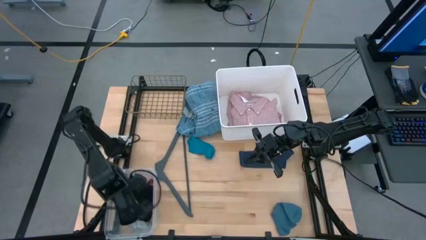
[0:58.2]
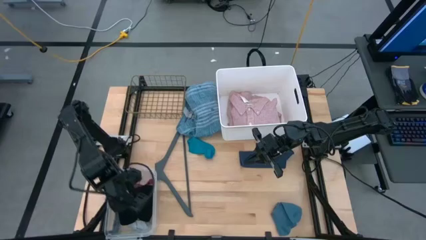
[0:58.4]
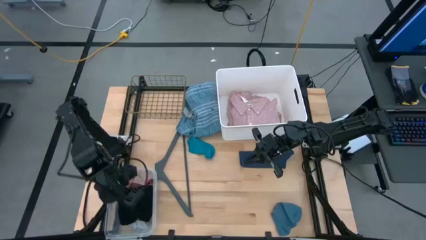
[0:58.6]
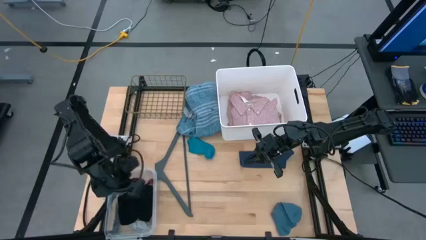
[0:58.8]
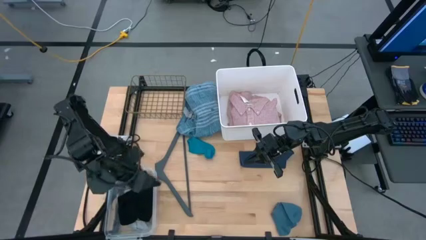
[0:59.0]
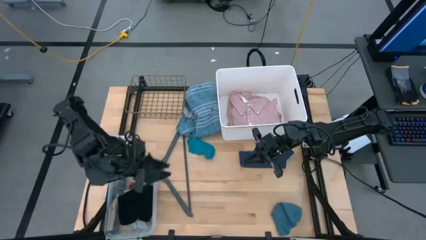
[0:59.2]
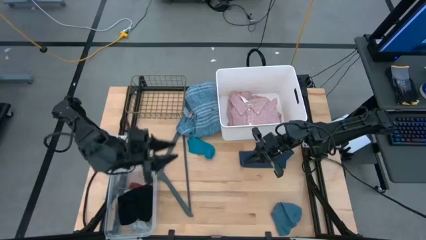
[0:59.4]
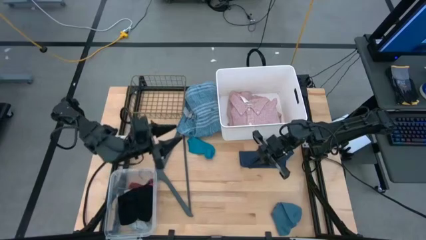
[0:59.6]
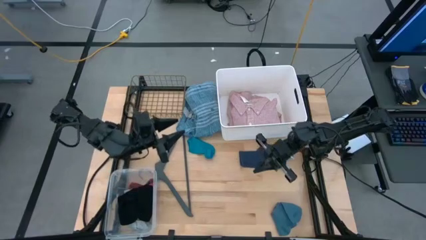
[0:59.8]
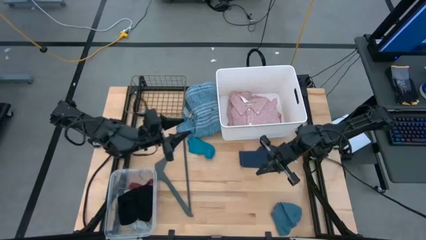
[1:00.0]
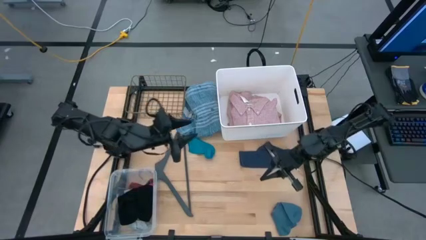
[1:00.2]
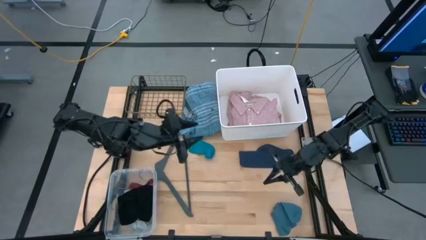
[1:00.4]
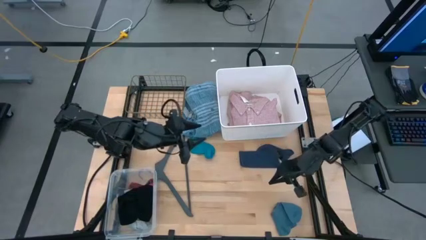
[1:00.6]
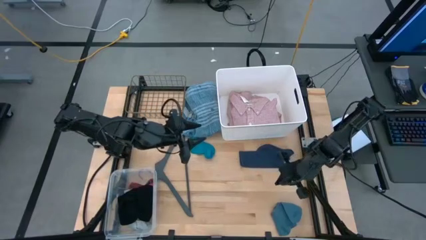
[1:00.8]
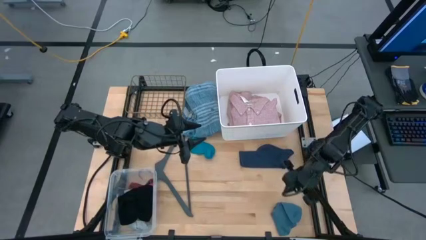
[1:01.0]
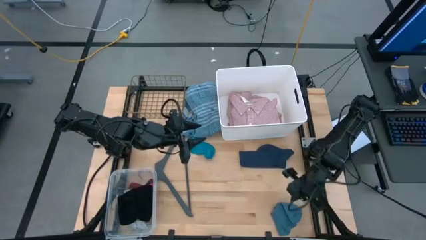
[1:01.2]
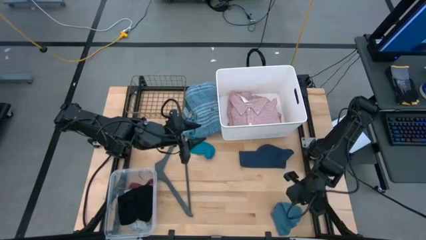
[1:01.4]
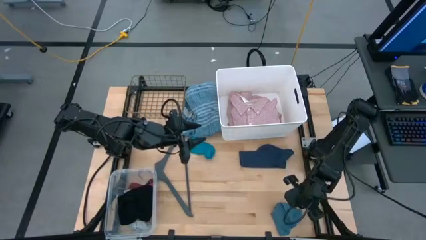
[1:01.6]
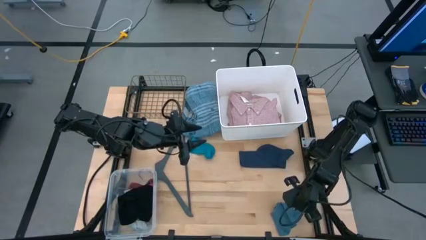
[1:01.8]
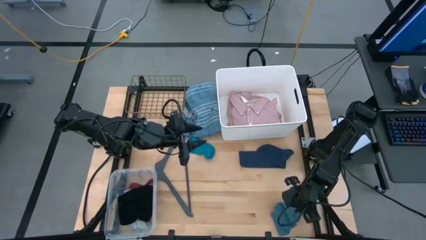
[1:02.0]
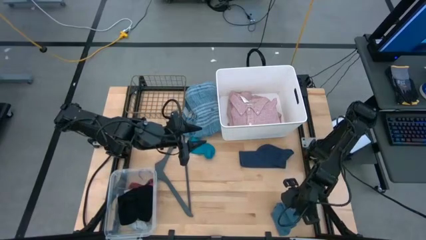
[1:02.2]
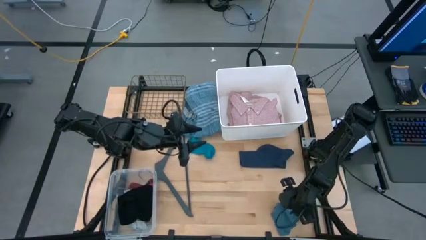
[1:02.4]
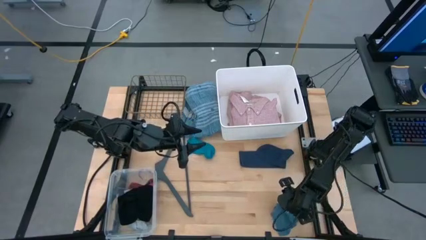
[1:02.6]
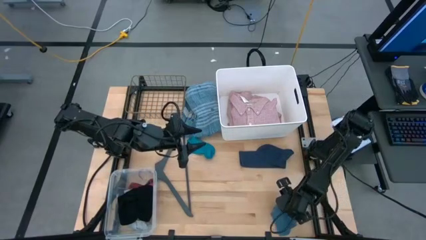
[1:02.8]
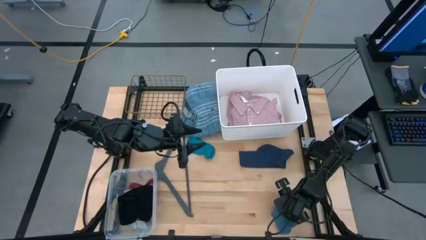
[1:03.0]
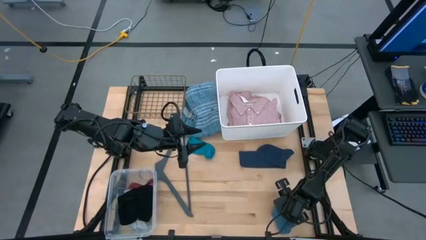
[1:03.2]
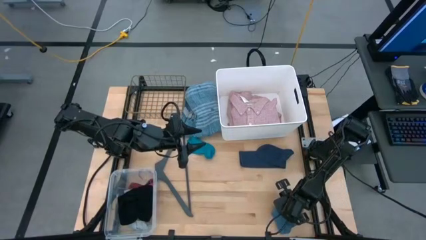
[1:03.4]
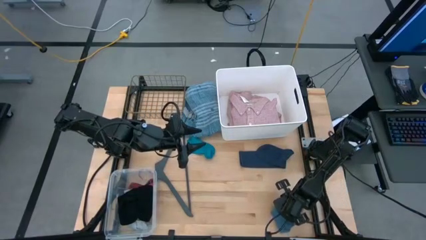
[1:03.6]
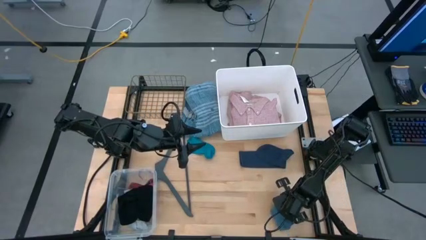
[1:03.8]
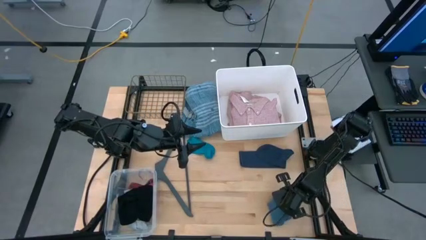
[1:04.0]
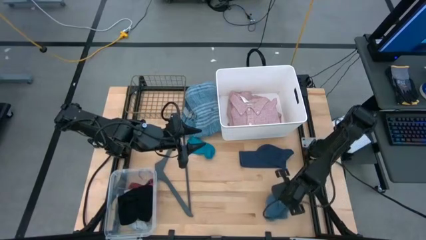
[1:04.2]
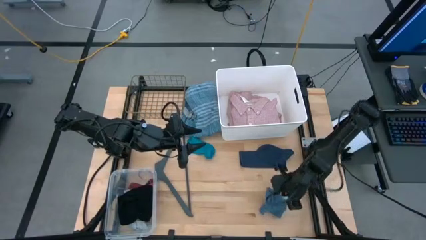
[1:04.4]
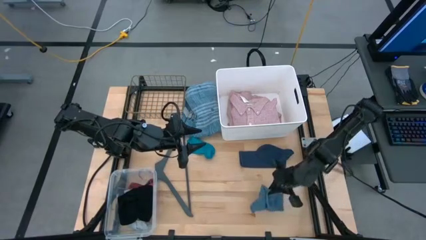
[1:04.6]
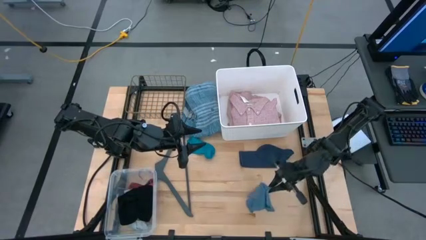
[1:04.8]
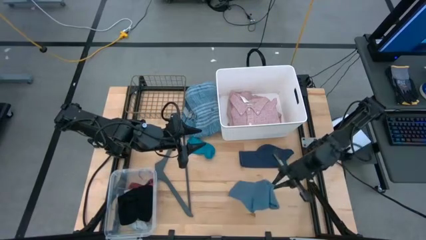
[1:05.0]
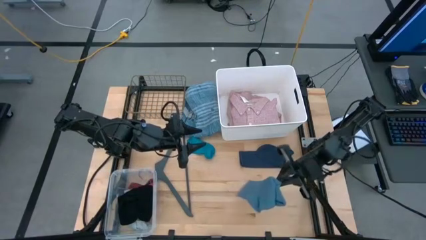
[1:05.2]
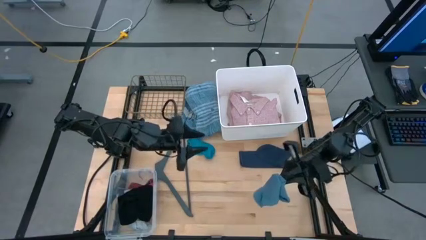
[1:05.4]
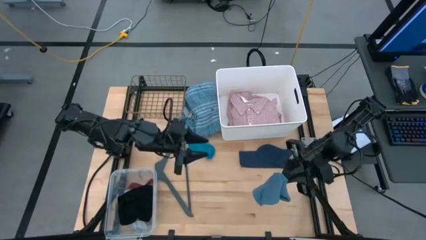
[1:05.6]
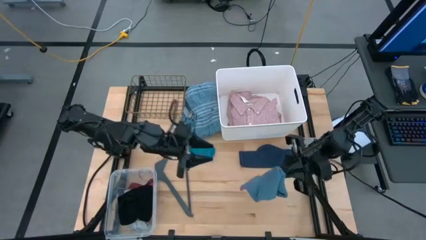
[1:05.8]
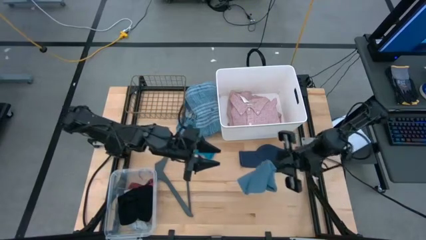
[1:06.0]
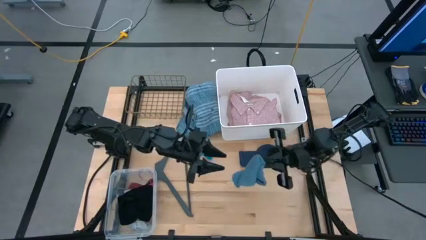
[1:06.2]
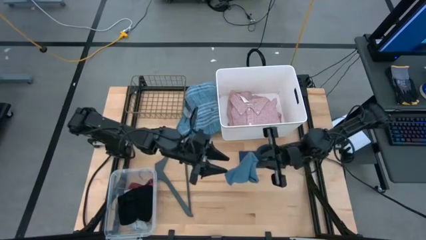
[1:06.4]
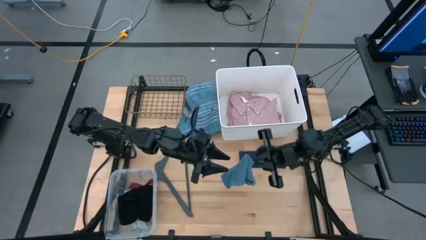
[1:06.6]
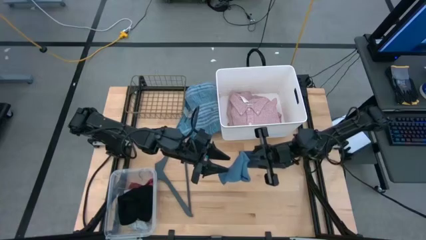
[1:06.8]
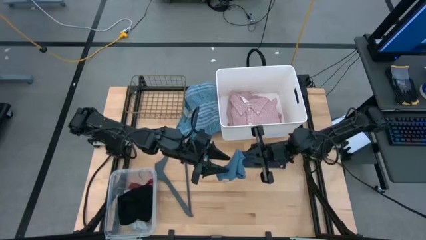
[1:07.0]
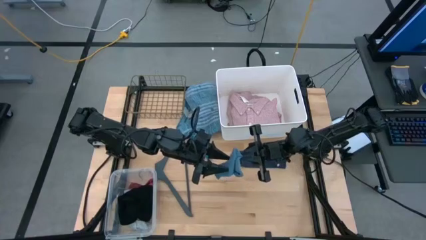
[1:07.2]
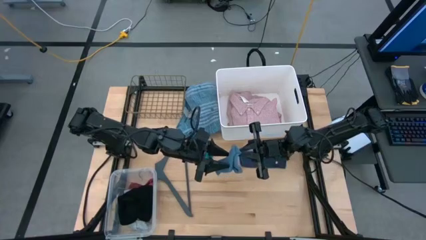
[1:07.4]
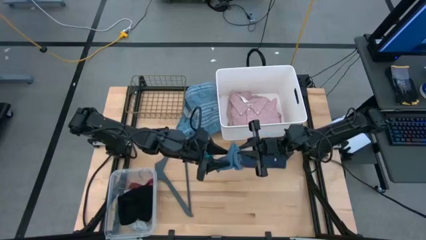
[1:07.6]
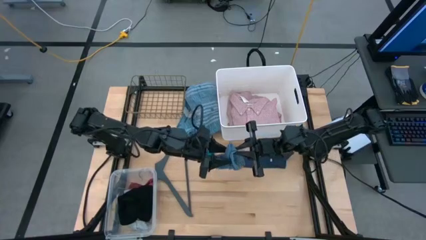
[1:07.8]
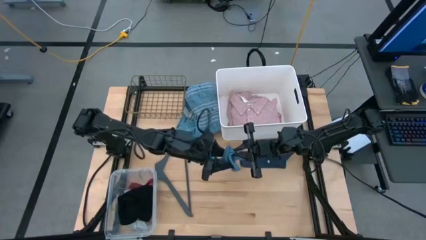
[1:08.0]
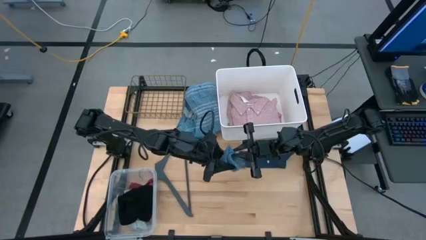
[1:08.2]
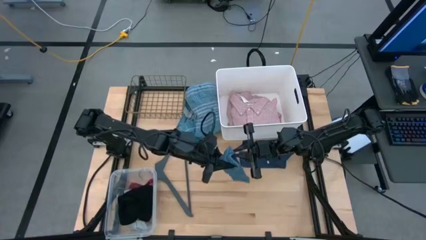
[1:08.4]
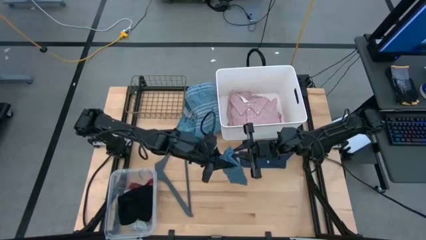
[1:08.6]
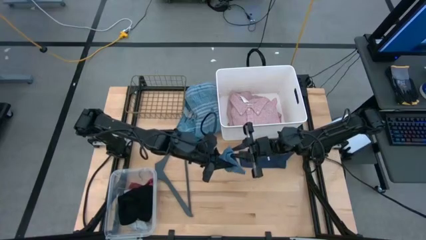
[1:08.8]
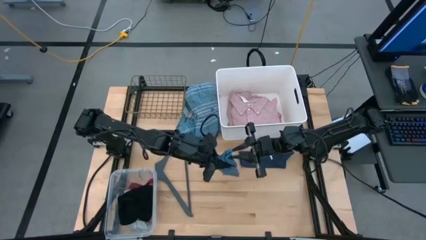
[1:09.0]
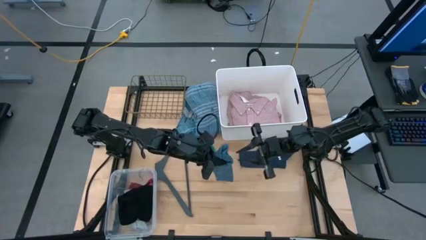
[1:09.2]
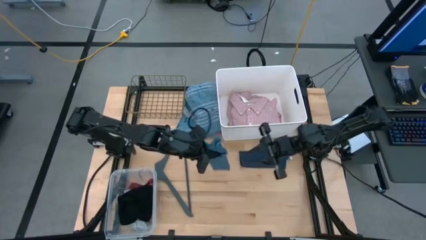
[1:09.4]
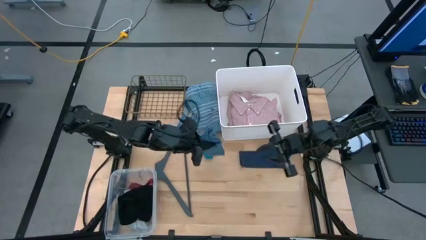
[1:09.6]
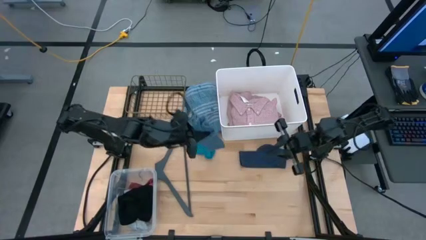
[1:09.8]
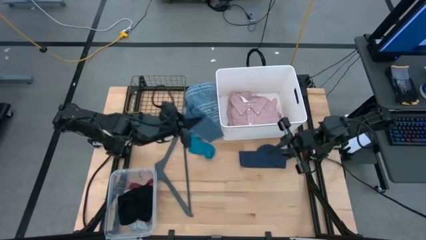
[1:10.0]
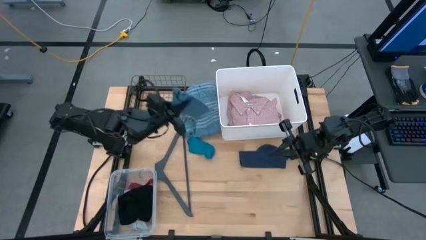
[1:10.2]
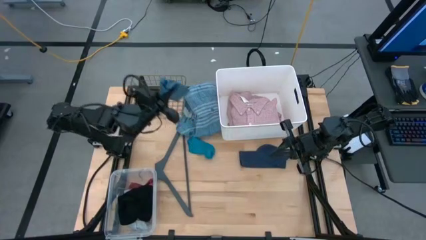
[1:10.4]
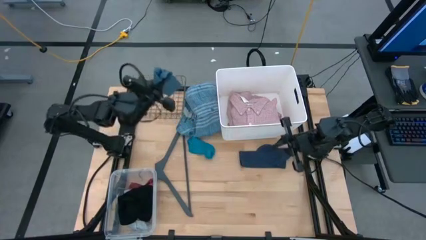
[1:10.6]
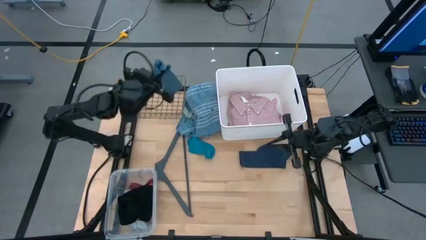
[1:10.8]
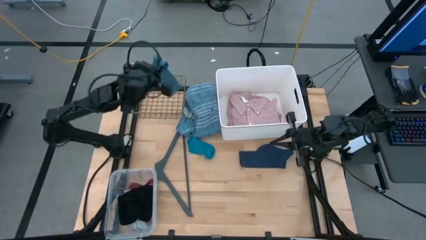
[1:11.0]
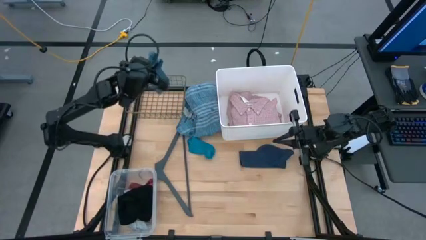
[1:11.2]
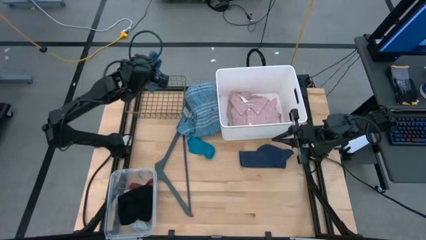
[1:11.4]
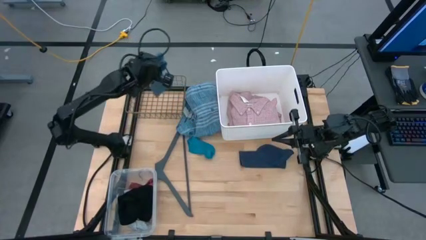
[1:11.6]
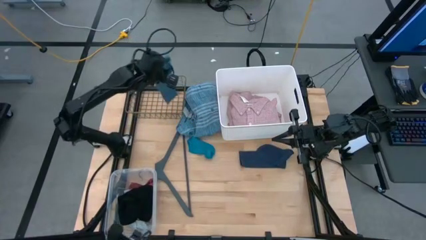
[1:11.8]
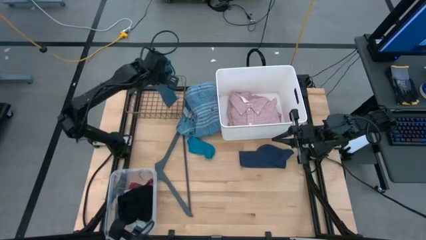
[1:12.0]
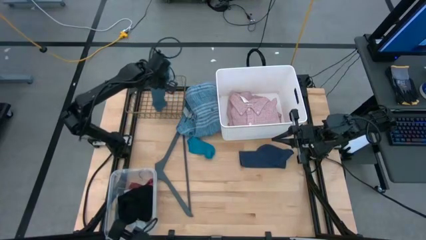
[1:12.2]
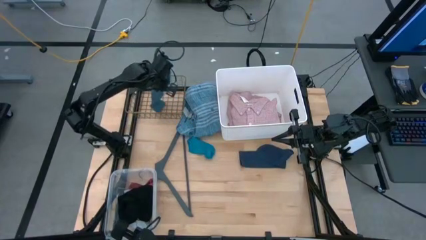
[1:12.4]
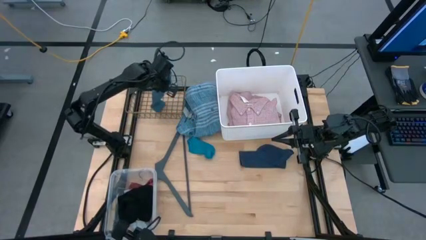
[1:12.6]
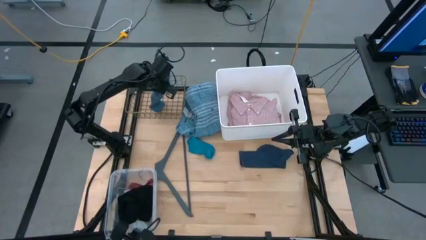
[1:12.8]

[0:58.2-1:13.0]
Task: Pick & Place Cloths
Put the bottom light blue sock into the gold wire basket

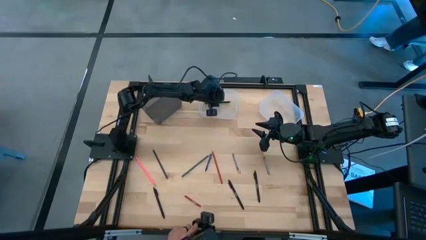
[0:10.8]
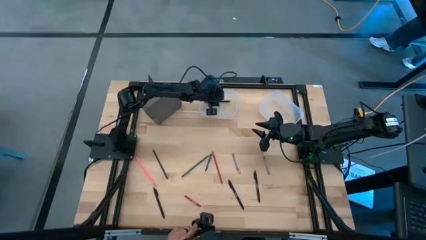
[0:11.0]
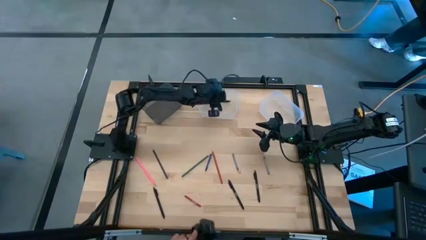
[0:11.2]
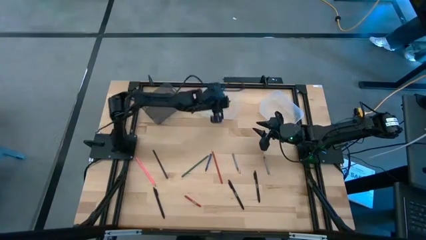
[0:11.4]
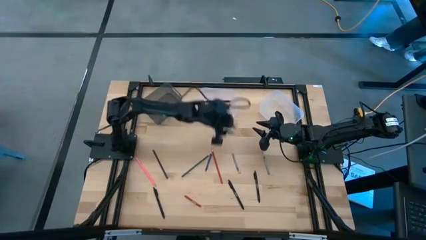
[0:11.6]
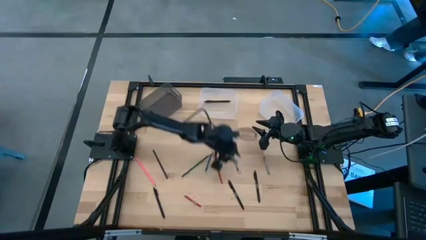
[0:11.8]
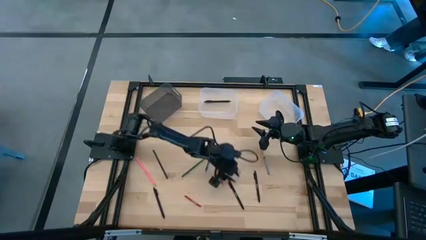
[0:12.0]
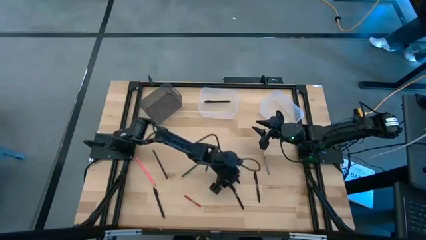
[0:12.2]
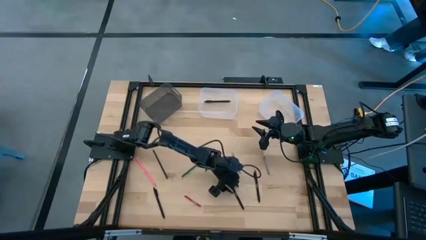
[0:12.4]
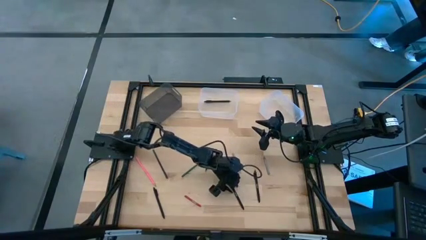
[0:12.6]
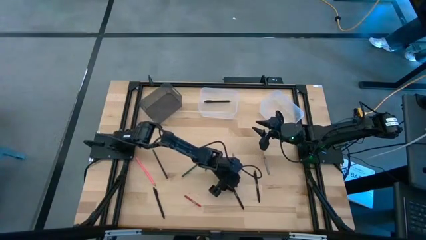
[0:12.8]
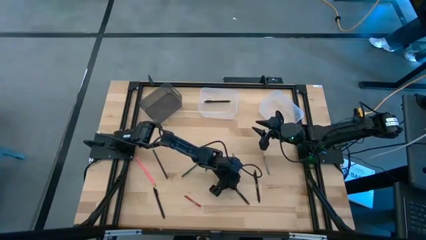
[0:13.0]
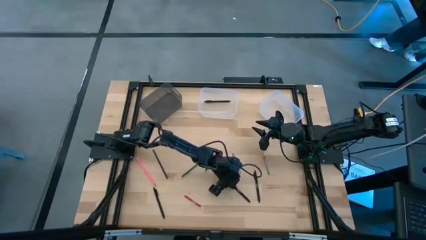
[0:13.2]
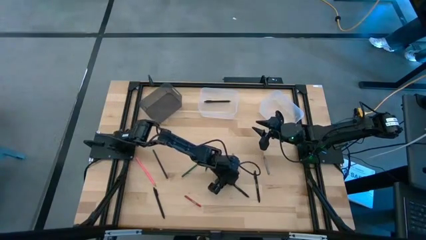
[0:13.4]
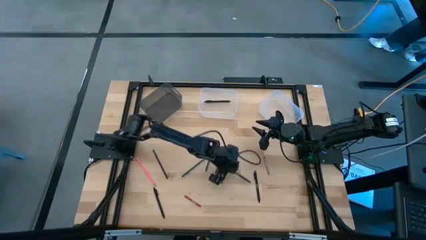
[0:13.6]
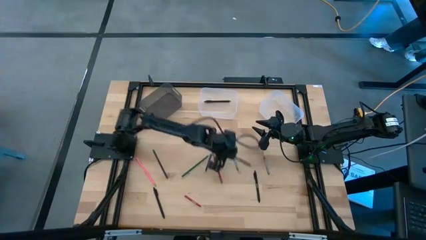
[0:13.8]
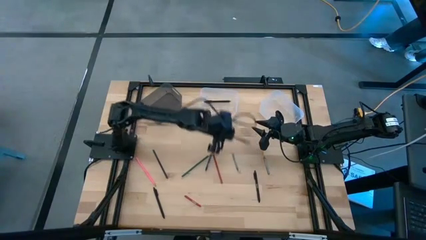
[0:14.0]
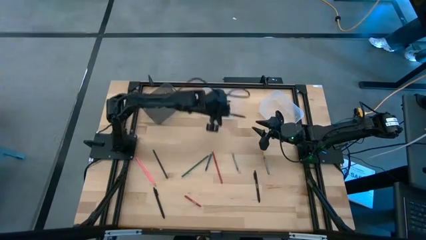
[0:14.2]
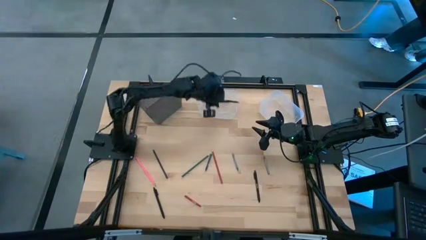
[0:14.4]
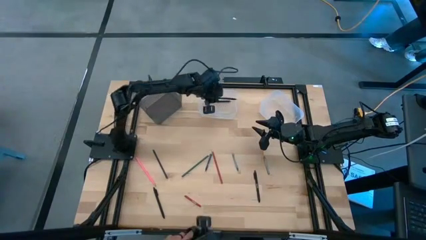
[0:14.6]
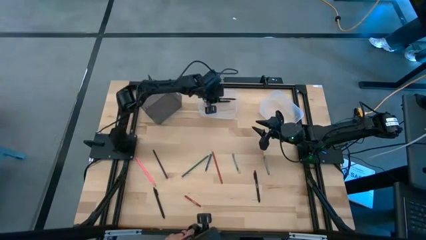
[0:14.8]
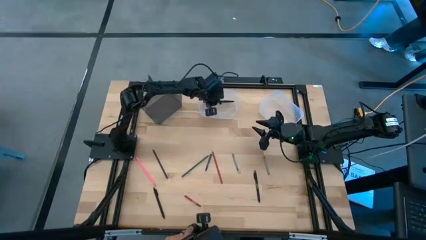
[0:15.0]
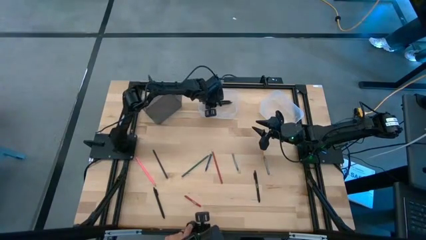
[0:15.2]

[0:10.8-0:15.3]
Task: Sort crayons/erasers/pens/pencils in bins
Put the black pen into the left transparent bin
